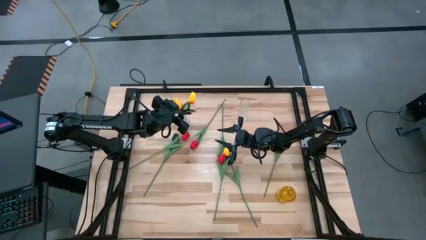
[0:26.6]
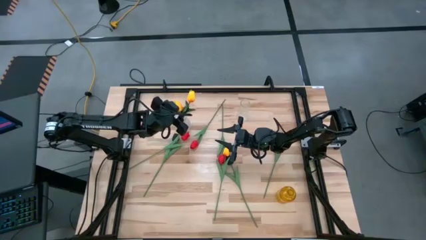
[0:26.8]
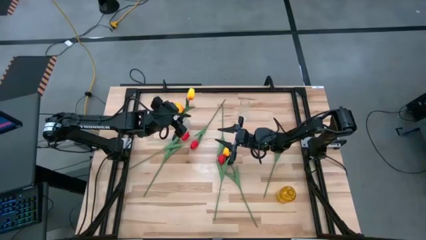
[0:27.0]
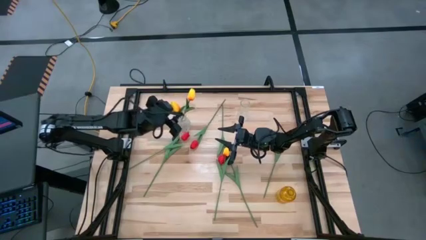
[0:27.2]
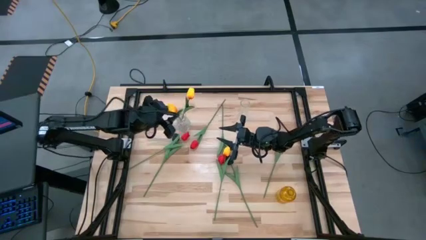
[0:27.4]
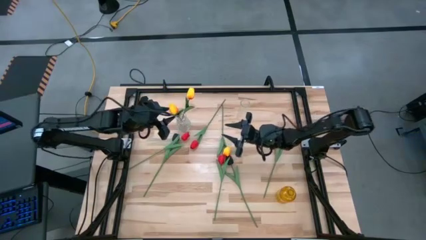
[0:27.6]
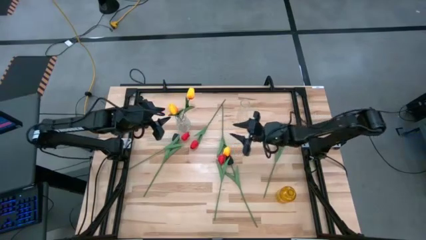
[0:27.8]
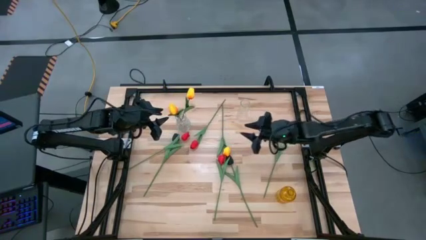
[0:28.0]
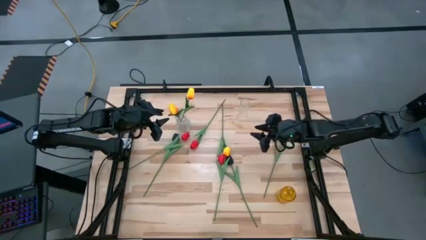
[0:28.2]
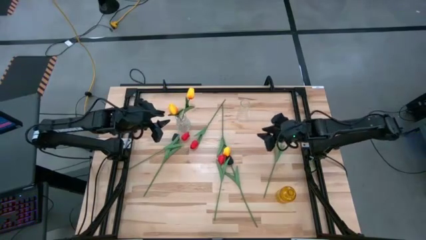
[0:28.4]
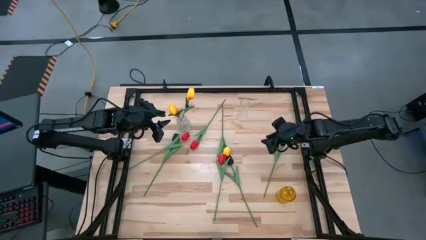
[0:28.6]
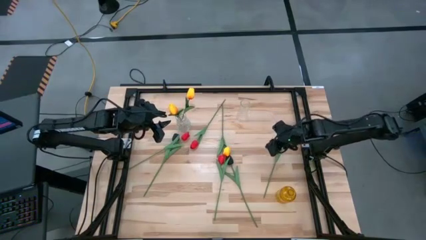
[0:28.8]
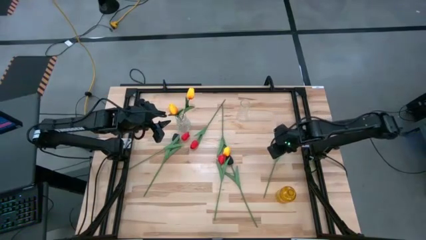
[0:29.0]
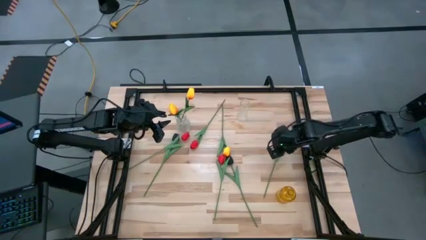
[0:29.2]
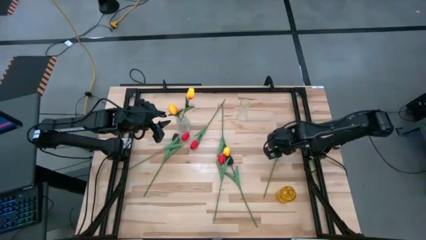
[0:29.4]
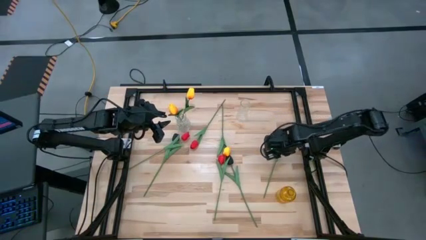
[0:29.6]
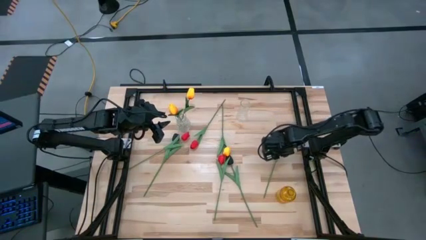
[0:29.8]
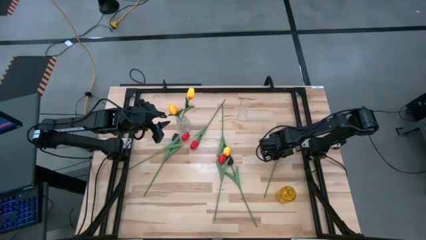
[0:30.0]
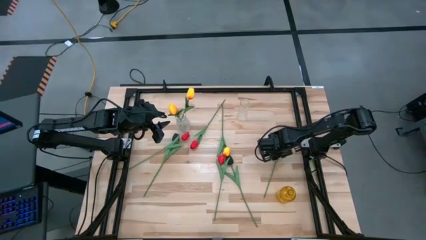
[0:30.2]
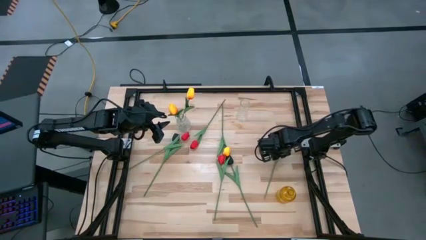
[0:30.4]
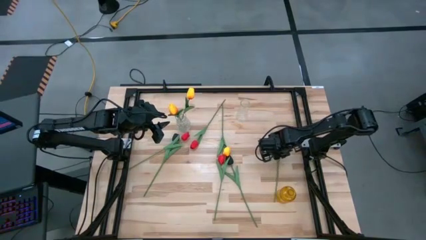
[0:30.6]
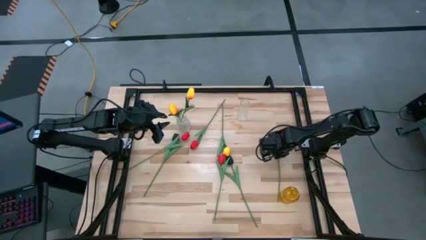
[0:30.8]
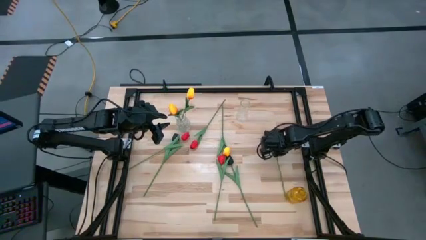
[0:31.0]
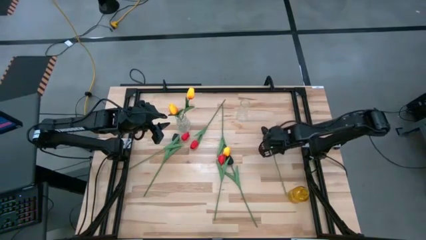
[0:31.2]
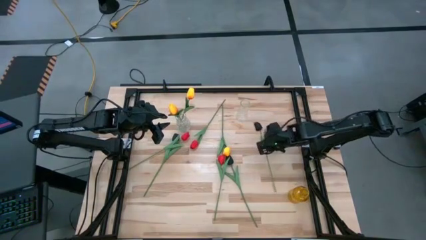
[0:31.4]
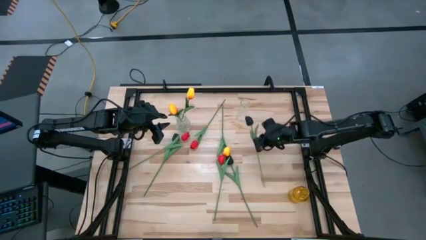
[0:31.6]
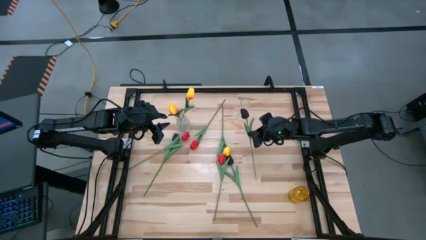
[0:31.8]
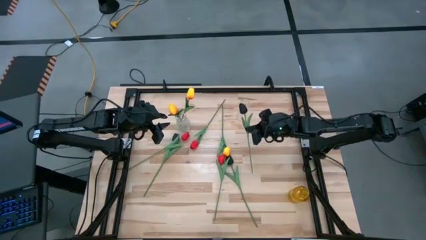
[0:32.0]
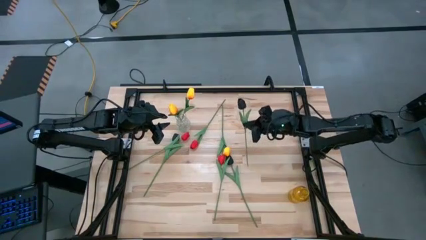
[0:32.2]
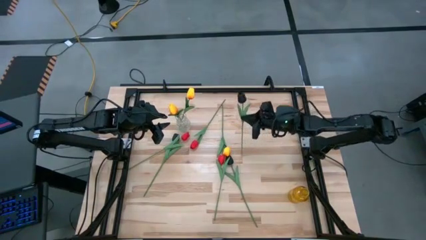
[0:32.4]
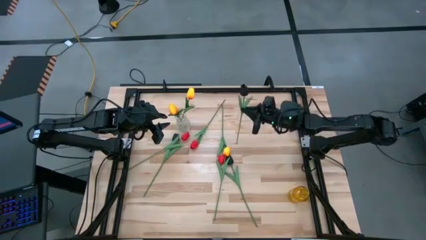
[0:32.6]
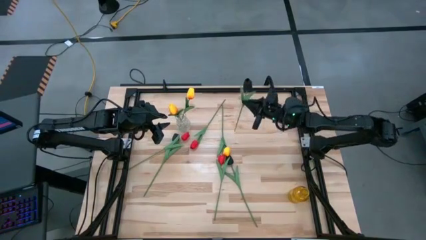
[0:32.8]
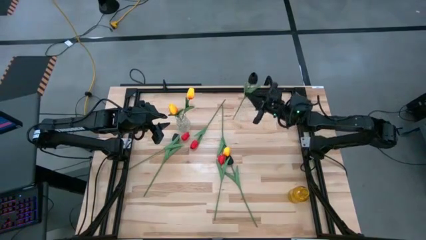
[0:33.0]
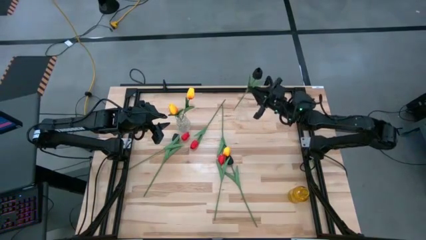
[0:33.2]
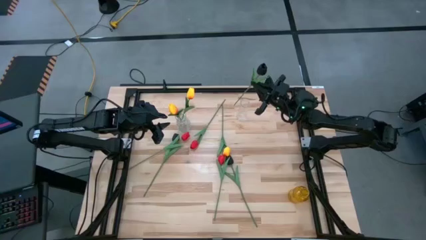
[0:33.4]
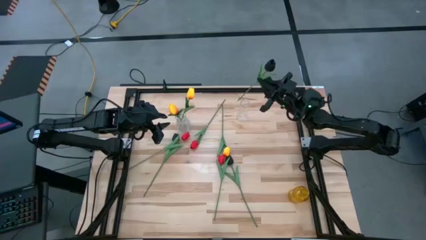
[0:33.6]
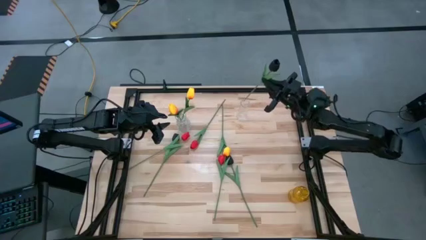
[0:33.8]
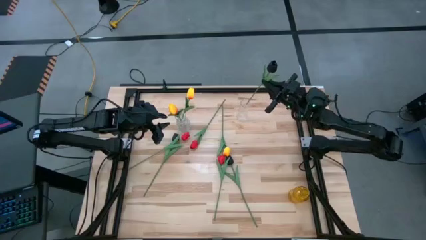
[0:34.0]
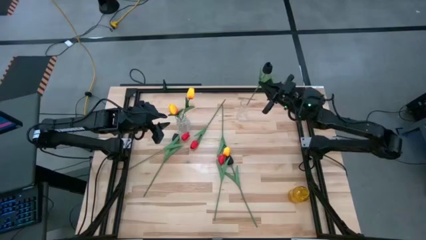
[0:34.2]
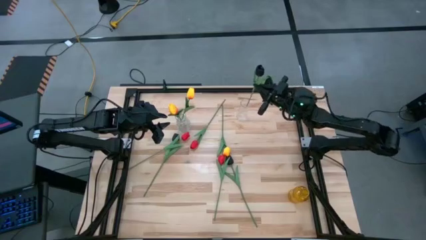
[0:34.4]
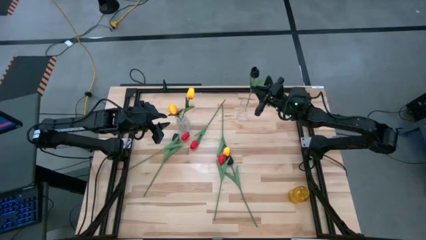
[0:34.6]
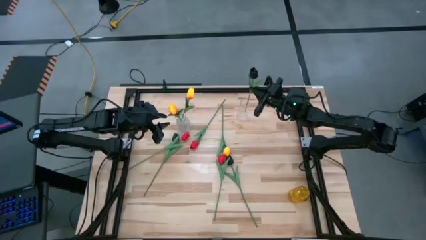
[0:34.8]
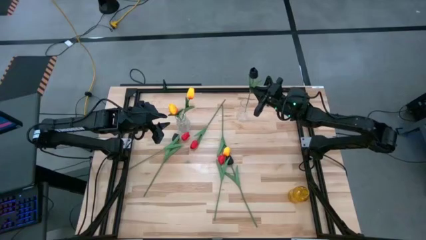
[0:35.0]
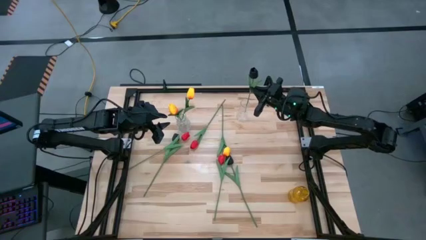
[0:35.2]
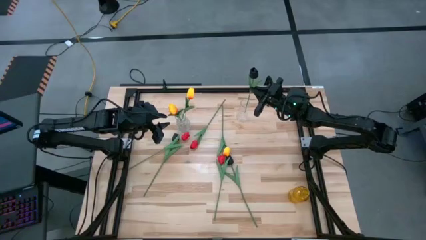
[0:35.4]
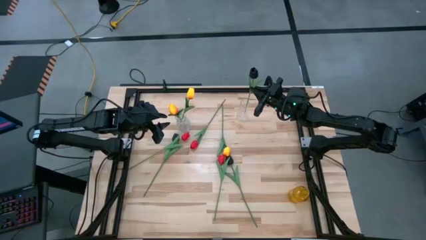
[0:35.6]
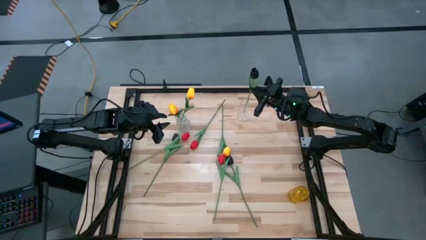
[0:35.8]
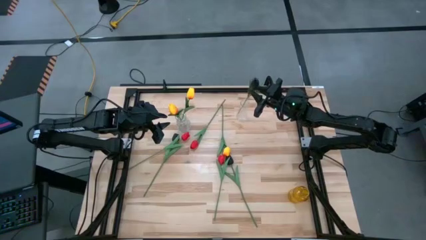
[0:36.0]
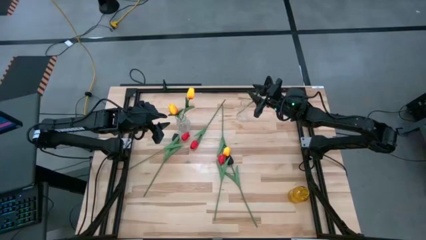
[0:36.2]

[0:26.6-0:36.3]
Task: Sort flowers into vase by color
Put the right black tulip into the right transparent vase

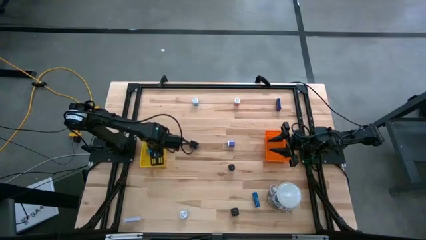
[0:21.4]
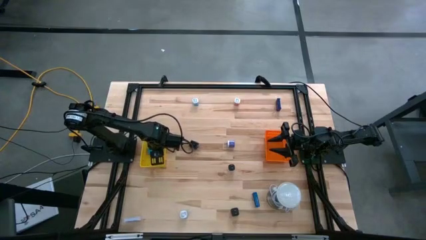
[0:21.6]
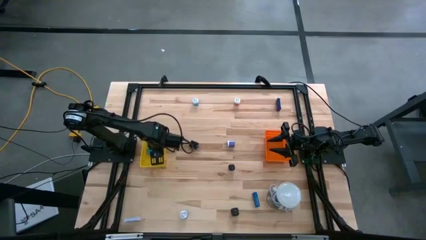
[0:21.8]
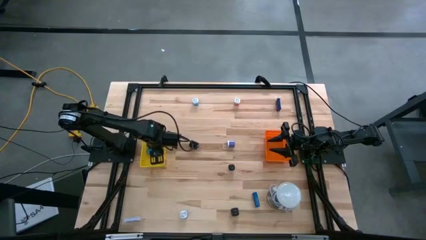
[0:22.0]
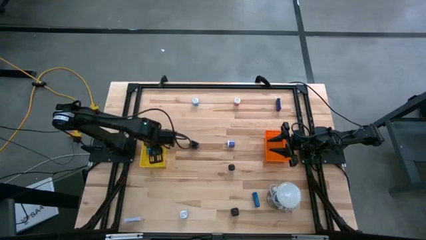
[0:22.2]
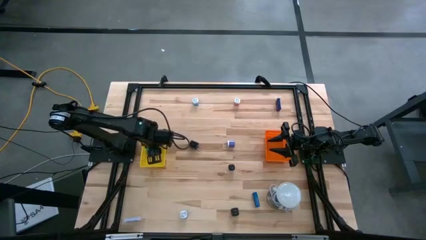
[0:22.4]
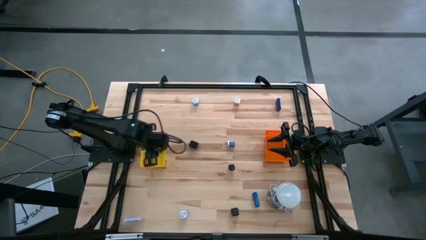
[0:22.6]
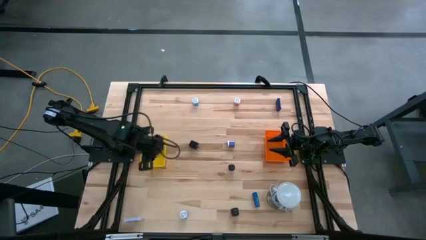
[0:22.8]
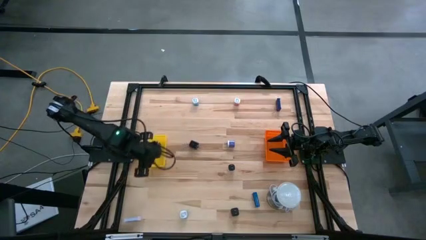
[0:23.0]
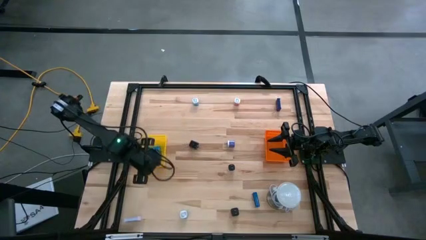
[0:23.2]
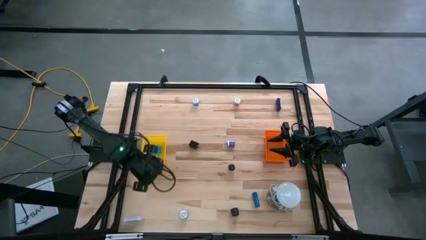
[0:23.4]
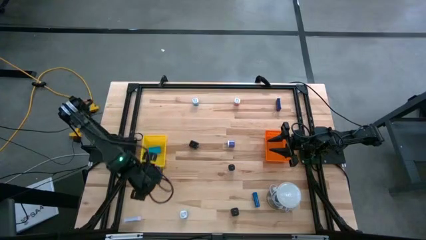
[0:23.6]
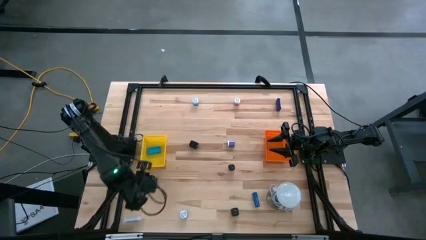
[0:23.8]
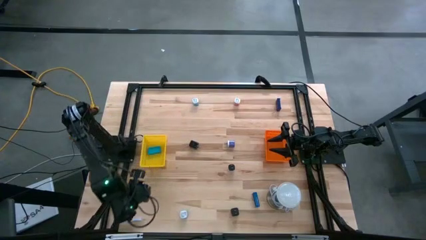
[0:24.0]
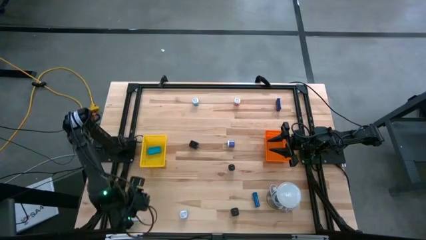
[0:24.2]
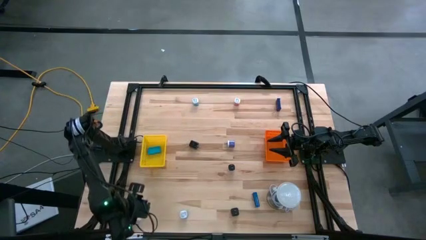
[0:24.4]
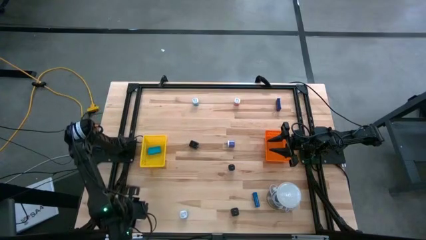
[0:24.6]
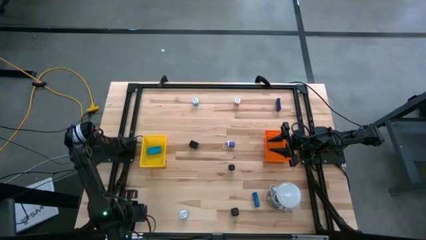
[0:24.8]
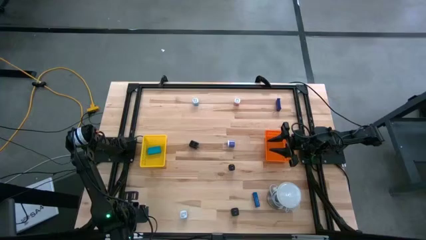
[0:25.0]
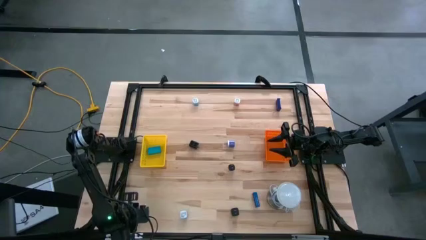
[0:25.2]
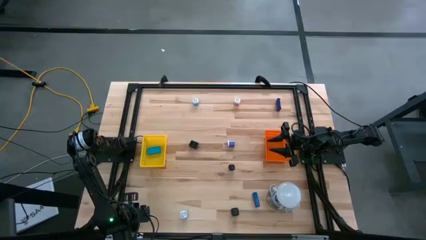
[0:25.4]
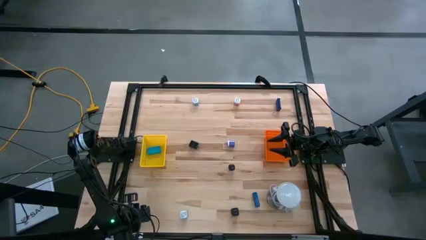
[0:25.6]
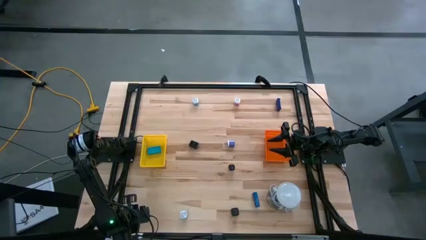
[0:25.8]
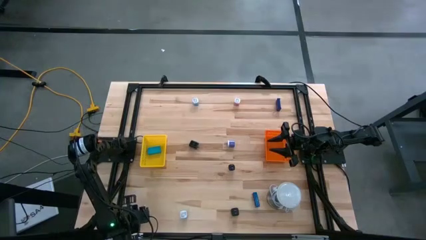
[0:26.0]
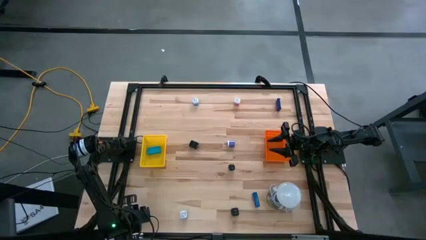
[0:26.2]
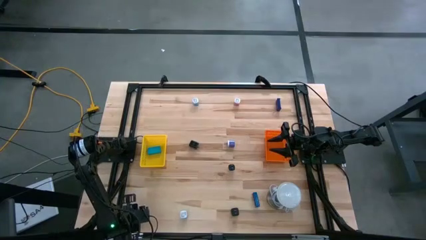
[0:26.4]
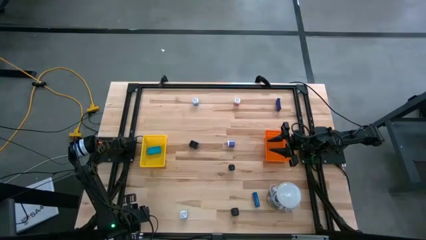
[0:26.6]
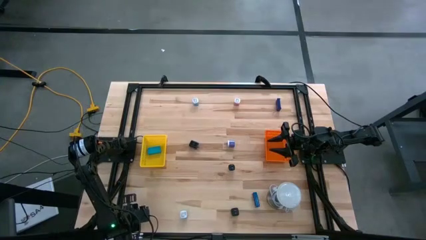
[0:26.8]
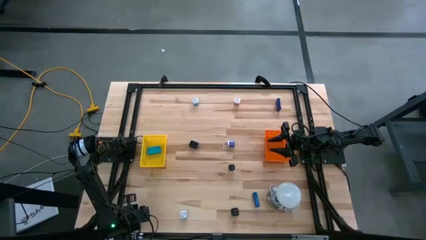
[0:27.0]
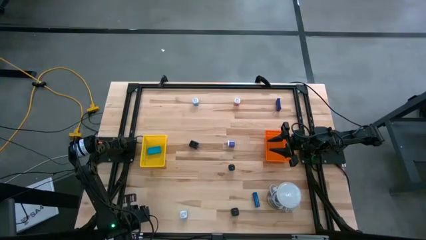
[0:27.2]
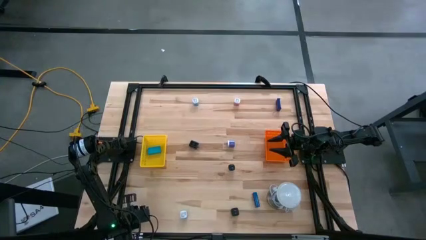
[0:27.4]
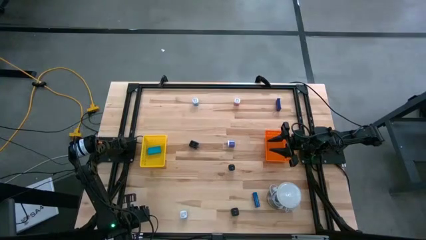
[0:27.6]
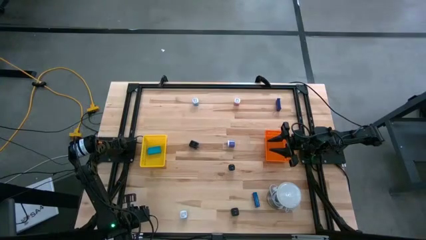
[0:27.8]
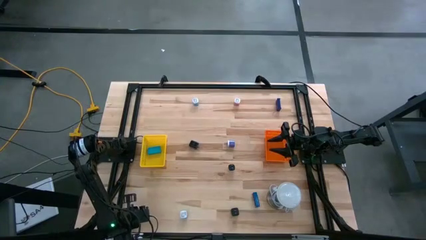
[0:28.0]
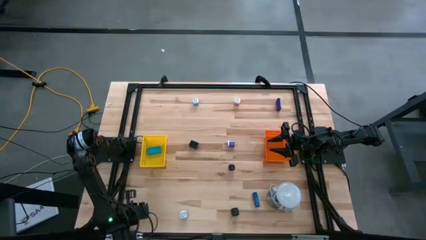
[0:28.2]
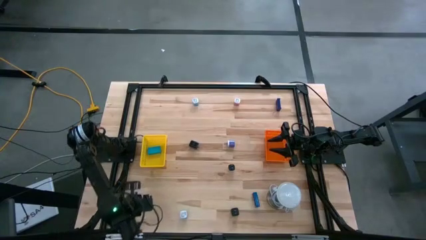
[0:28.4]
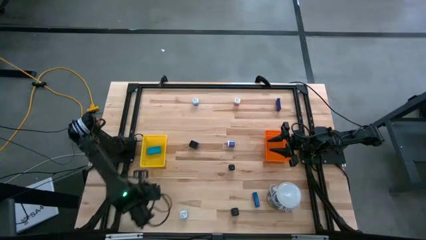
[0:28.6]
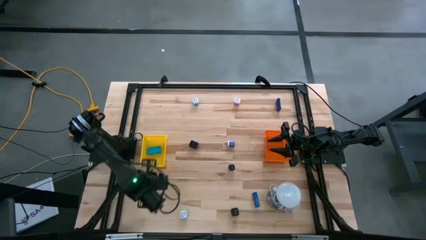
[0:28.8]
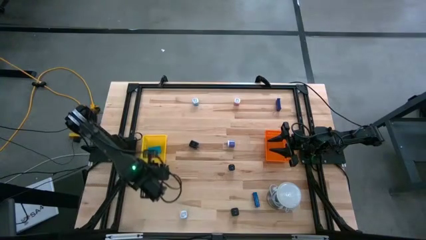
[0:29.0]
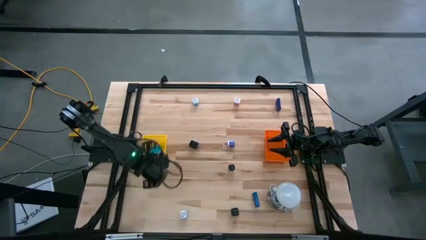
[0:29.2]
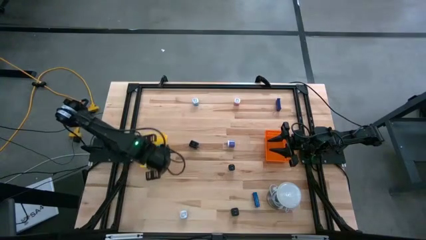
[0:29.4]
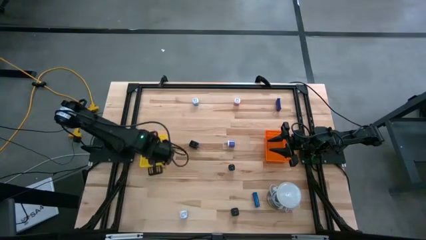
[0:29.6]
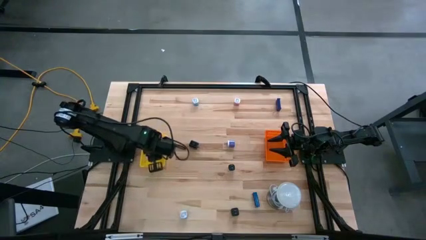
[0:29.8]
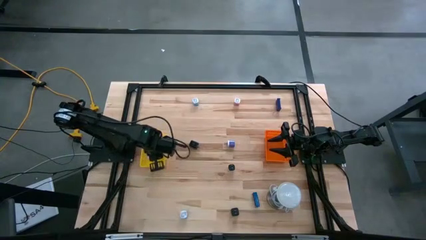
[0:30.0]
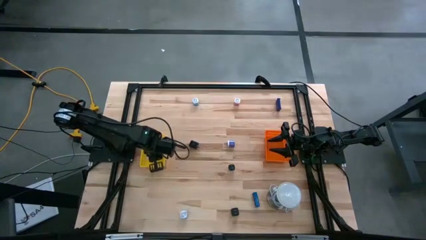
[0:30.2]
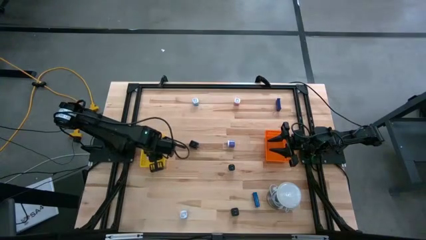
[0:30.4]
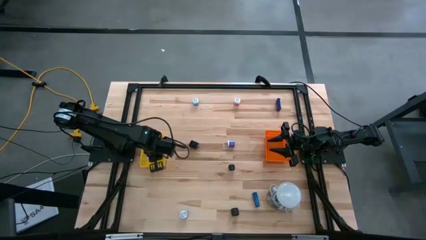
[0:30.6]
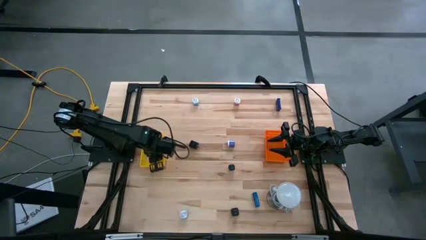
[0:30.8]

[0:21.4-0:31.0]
Task: Pick & Place Office items
Put the white digital timer into the yellow bin
